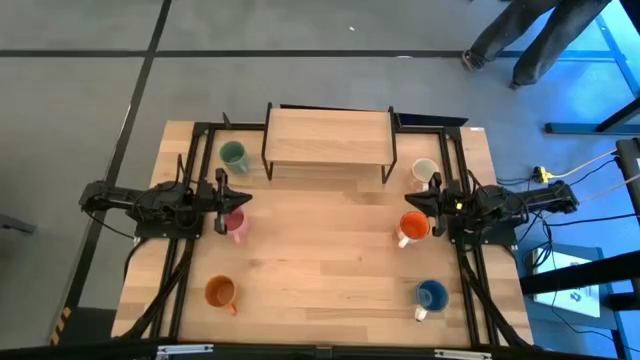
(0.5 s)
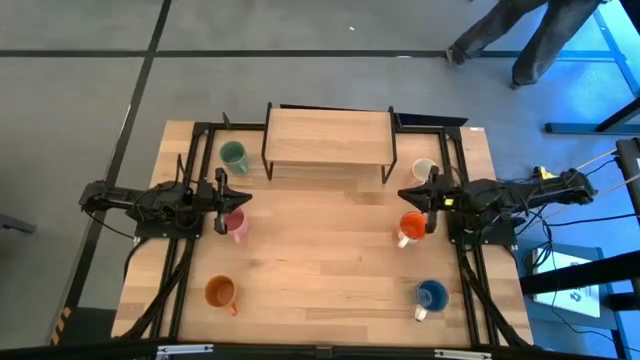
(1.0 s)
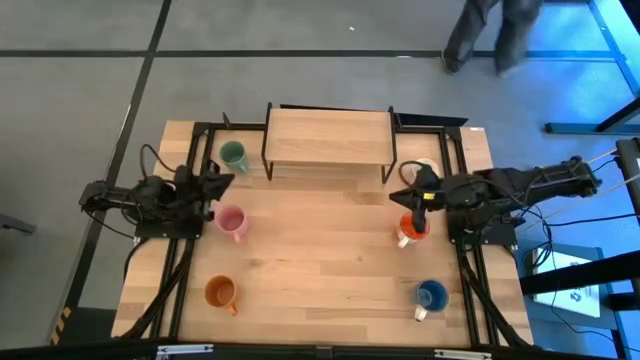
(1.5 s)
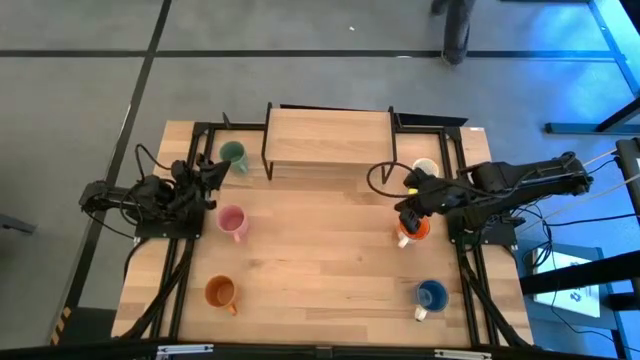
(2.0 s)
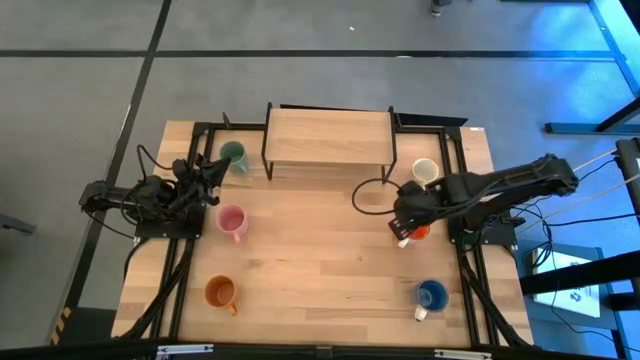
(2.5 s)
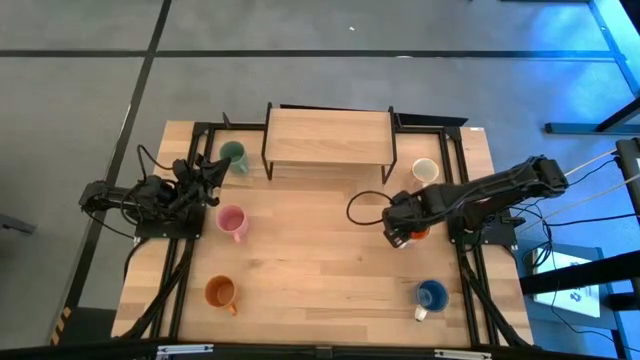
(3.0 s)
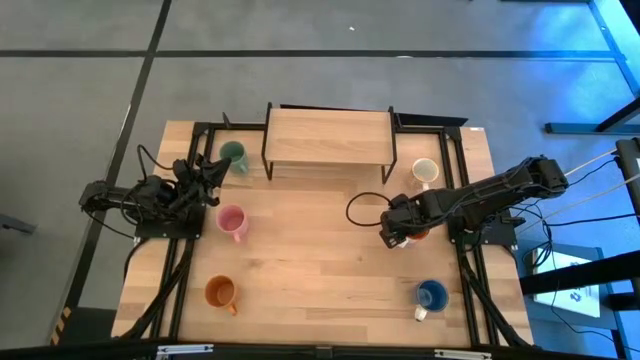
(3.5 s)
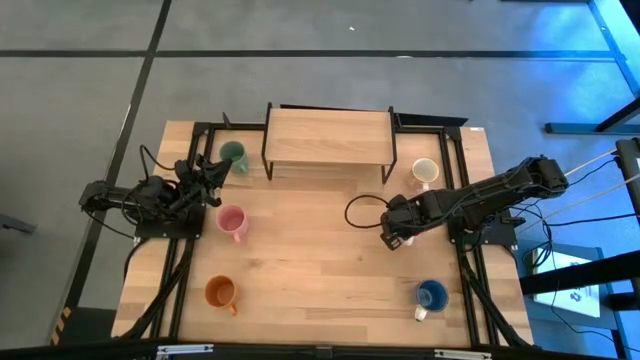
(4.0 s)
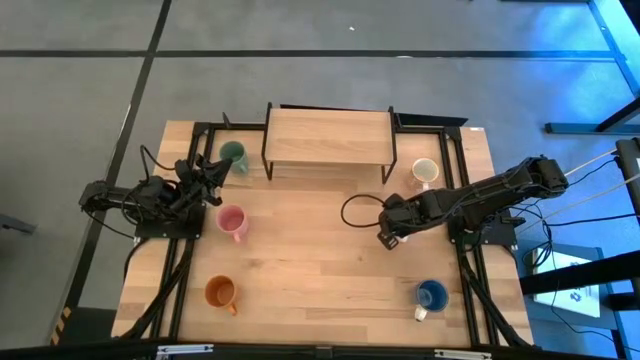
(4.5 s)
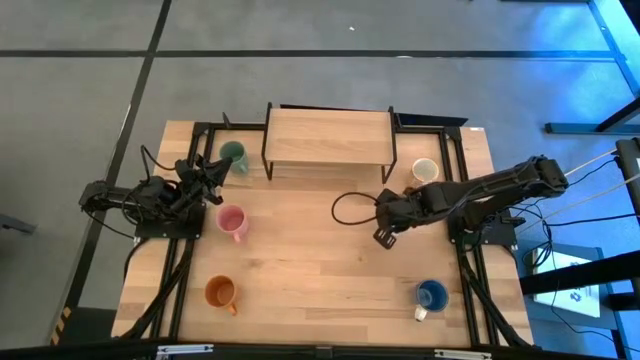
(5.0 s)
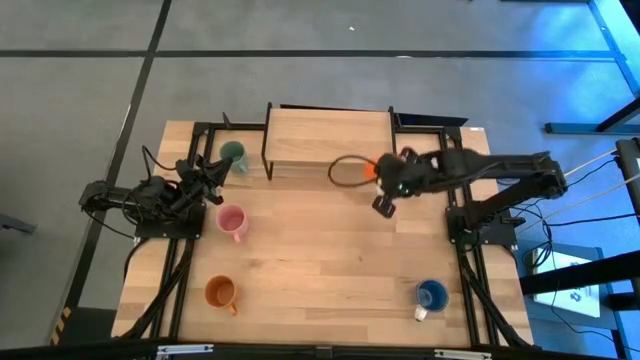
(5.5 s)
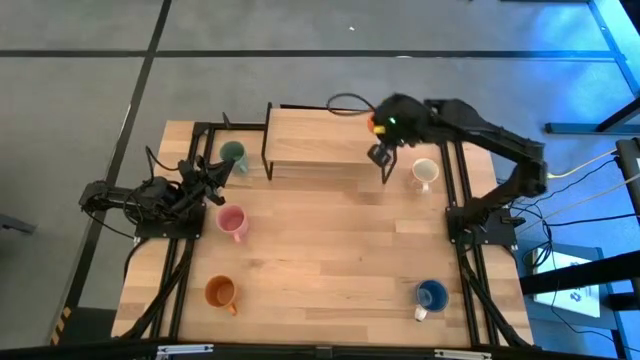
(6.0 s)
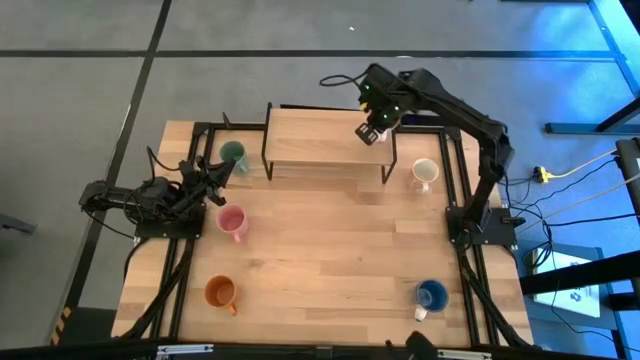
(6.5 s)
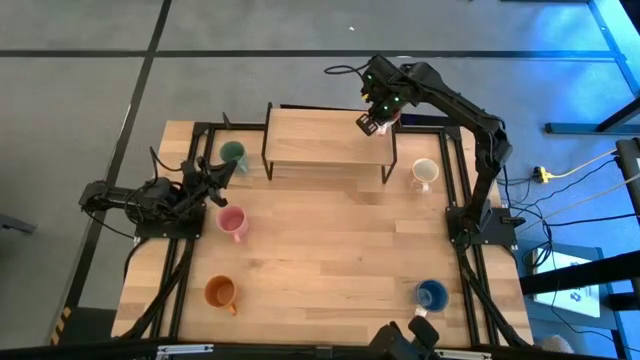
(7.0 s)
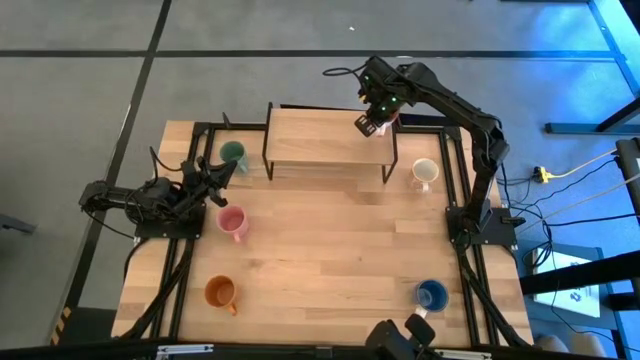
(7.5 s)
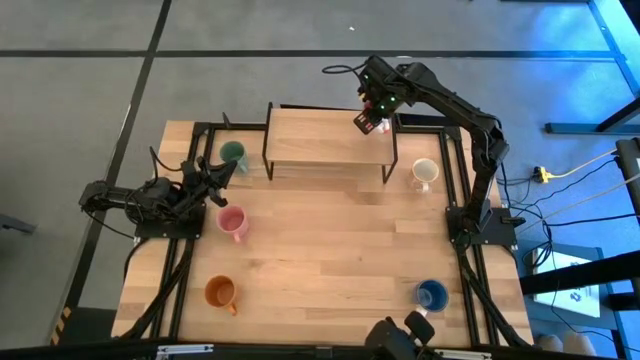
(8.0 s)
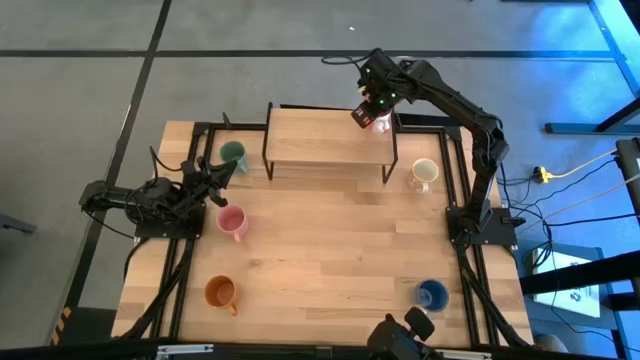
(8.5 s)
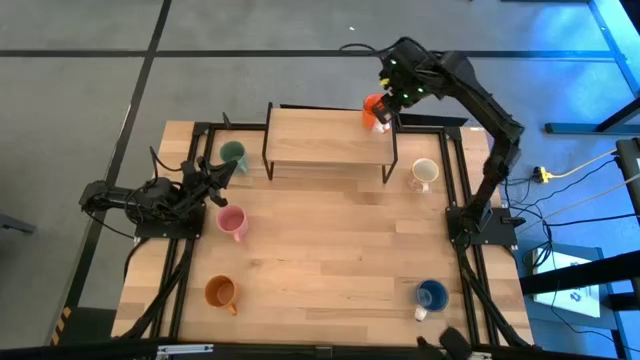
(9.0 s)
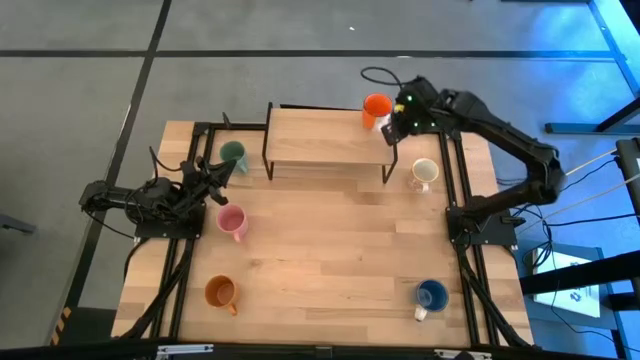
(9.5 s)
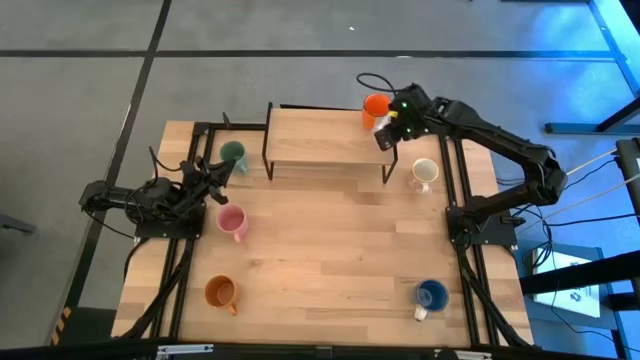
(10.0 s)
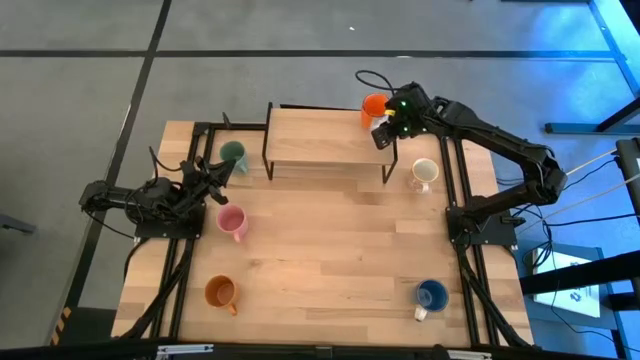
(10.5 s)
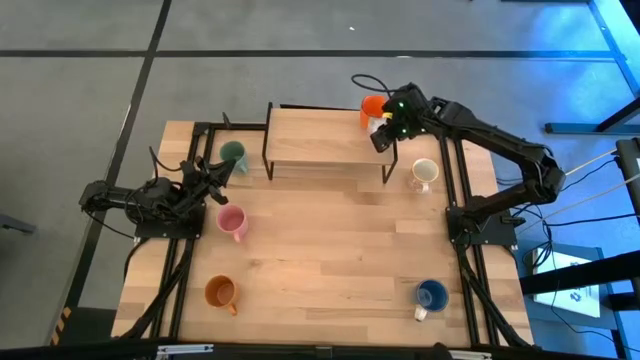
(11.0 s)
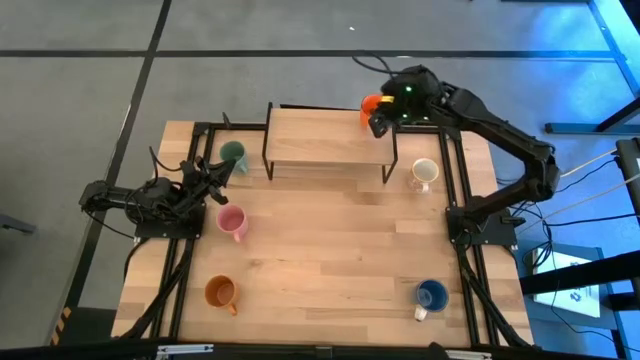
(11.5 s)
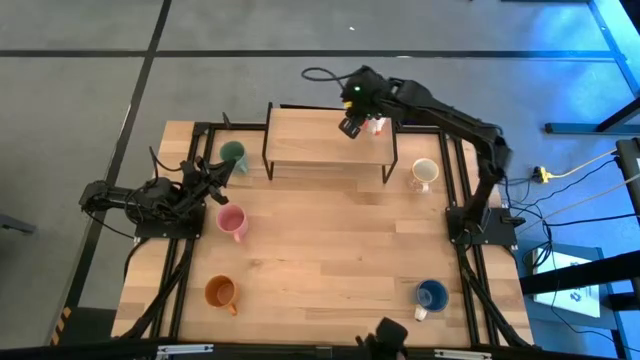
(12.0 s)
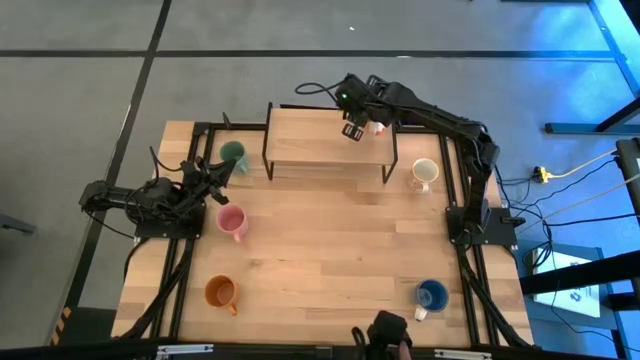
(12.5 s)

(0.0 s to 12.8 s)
Task: Place coffee mugs
Put the orange white mug on the shelf

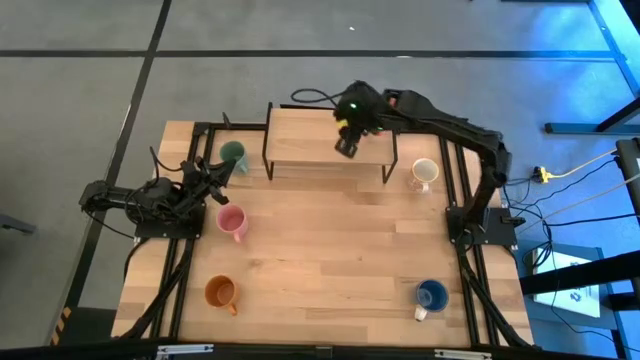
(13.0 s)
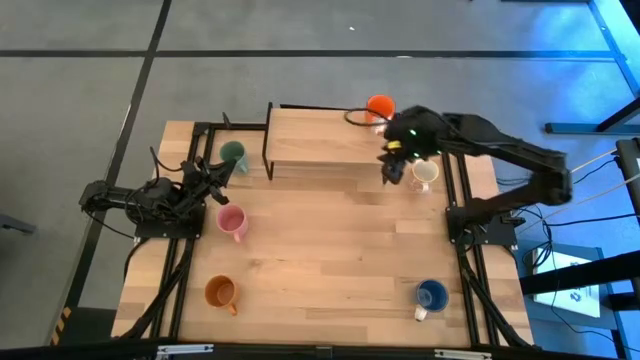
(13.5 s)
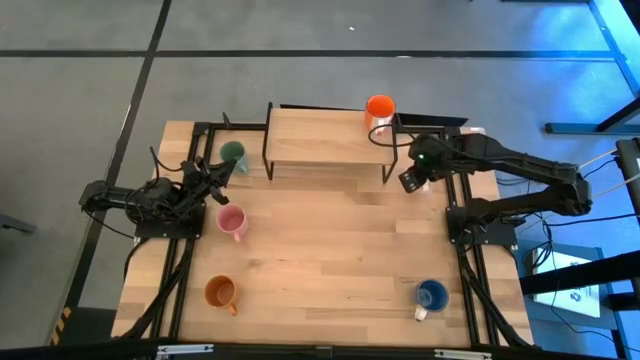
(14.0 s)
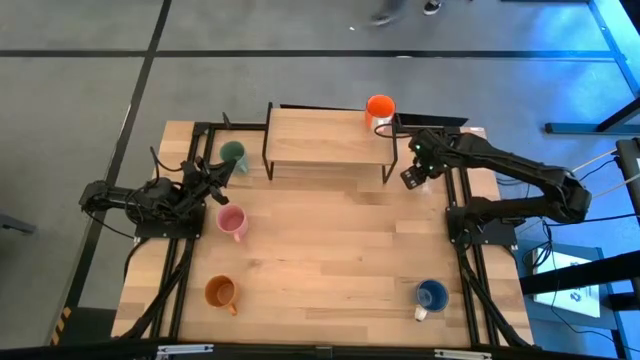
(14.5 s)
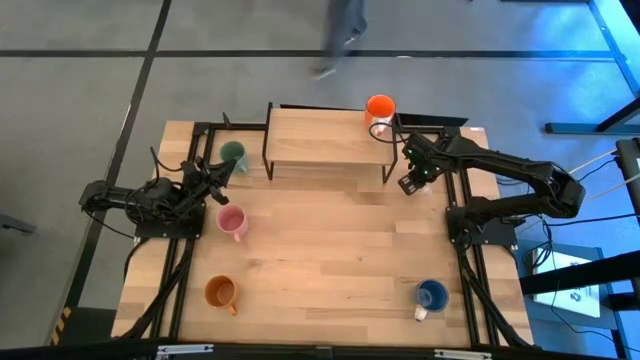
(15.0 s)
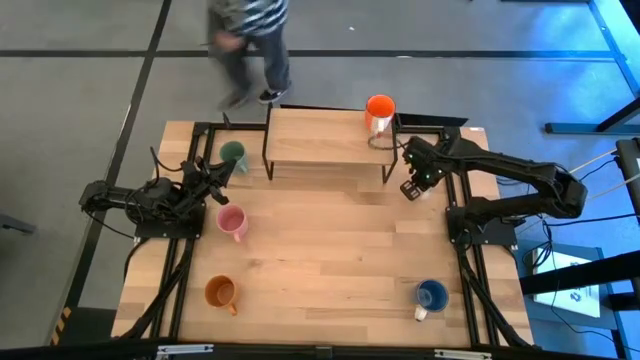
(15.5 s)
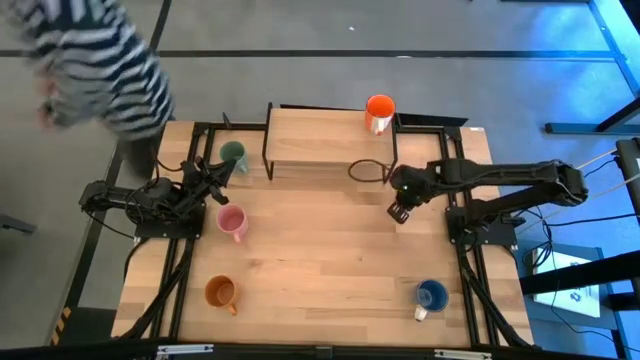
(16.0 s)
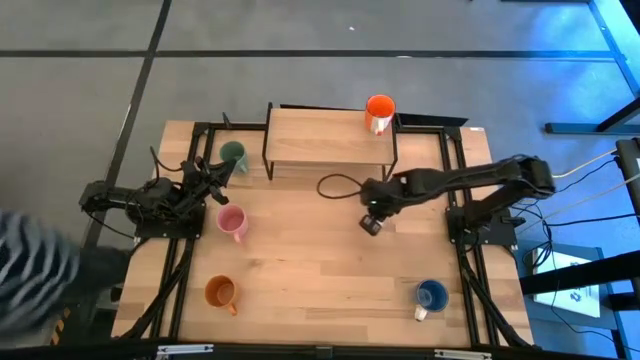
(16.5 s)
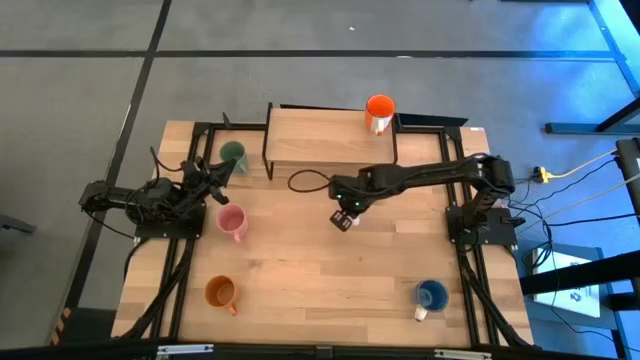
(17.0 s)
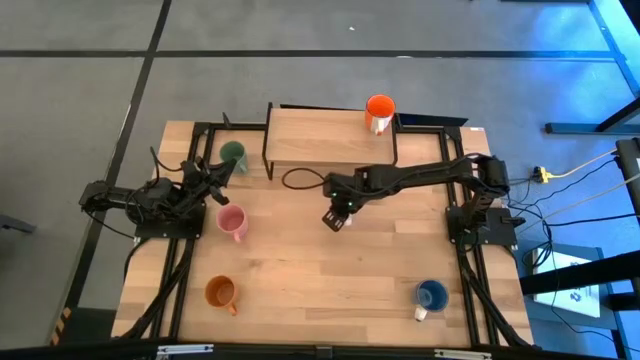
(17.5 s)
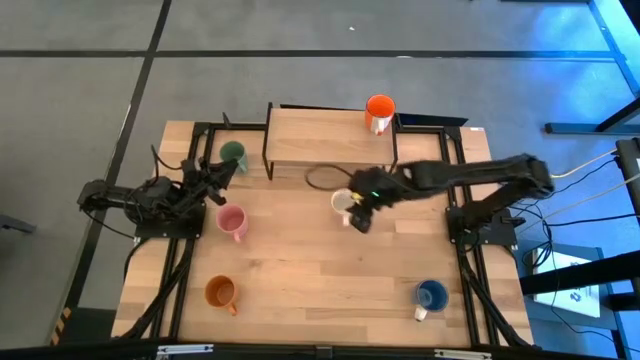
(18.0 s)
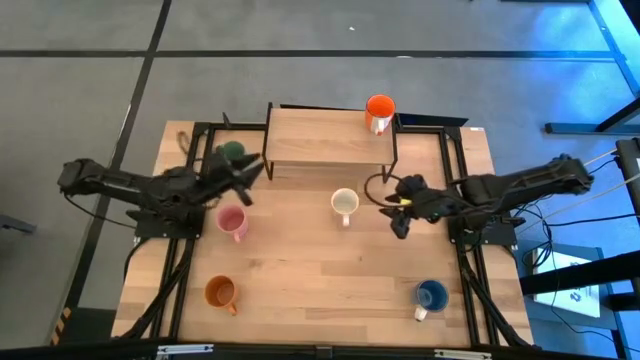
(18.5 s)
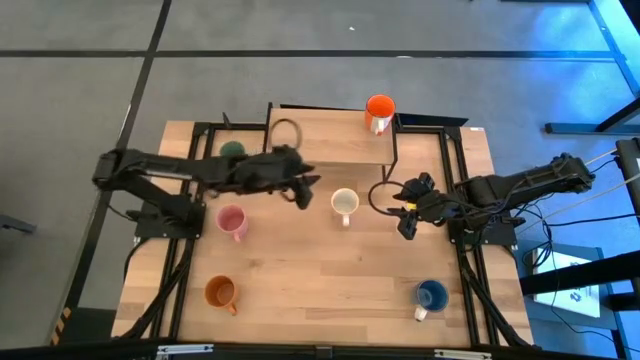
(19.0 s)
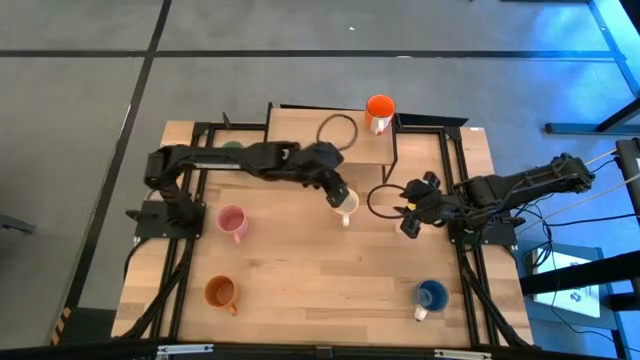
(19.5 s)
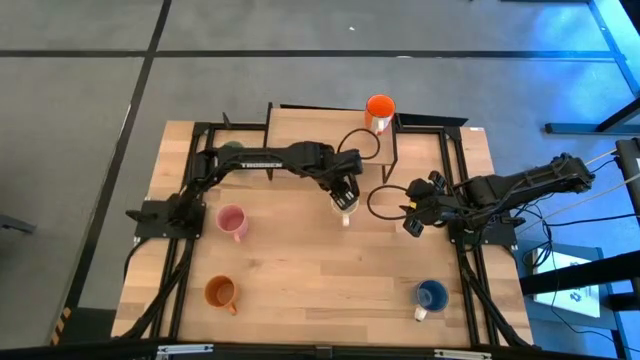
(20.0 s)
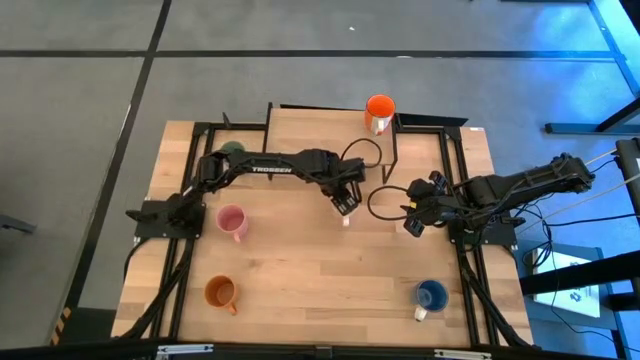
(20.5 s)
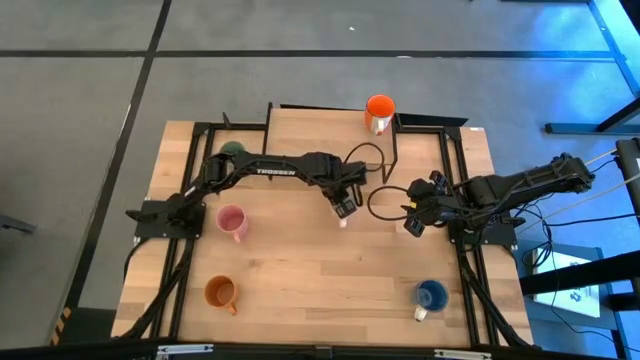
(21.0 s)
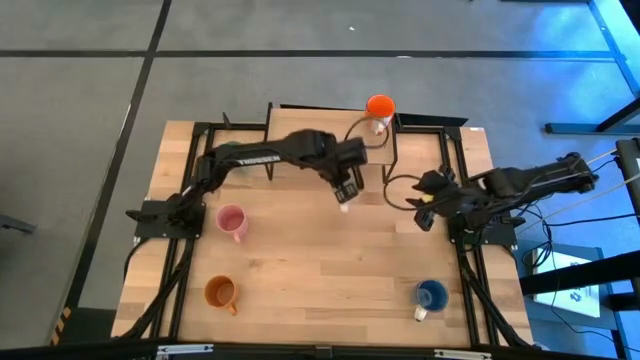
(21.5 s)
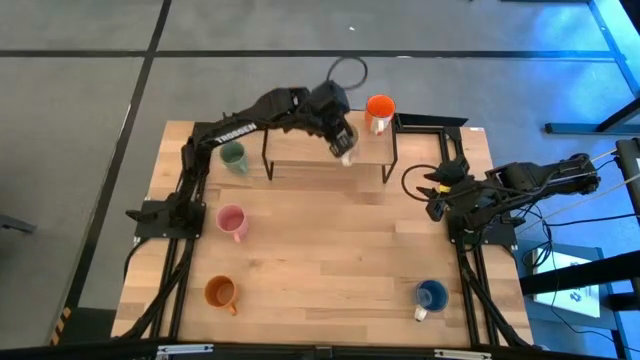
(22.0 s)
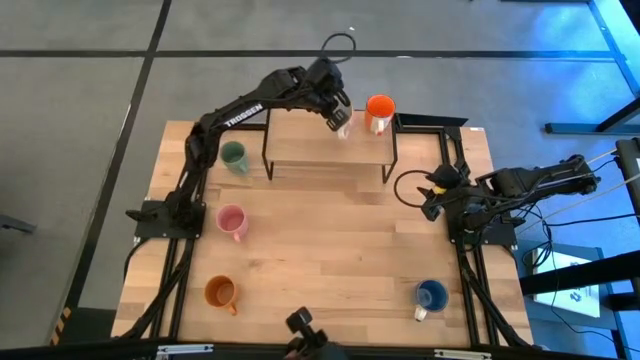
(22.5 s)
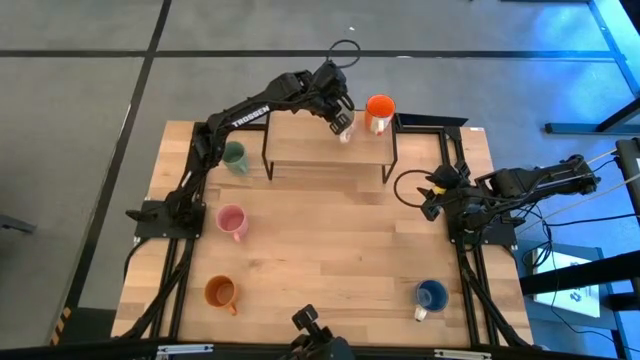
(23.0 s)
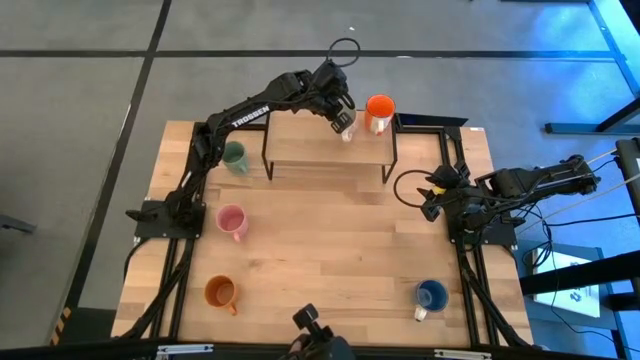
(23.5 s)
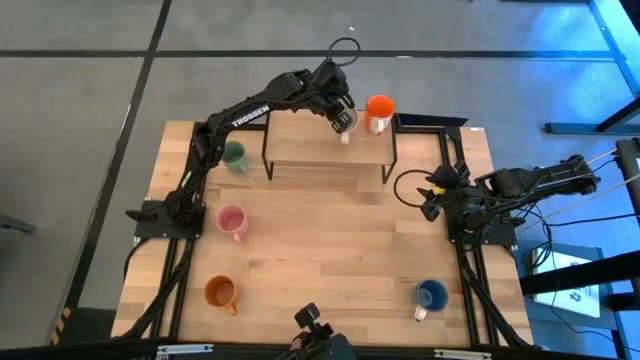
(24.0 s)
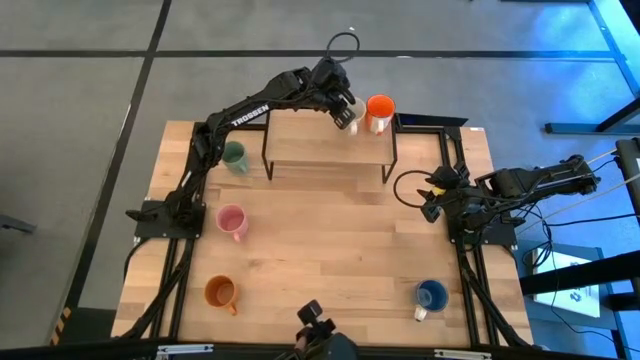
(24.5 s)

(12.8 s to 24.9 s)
Put the yellow patterned mug on the shelf
